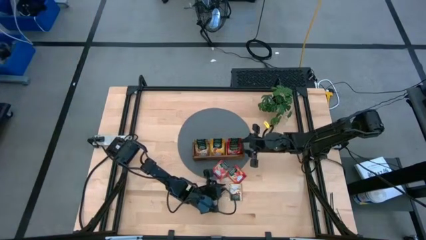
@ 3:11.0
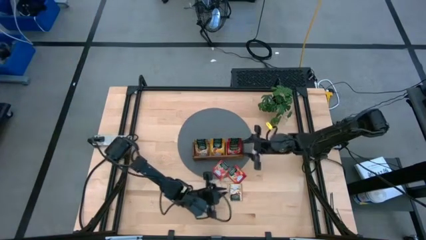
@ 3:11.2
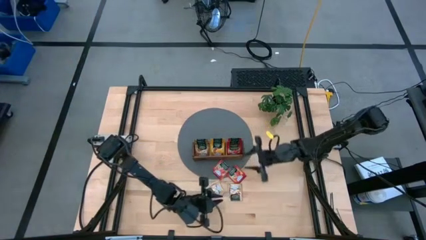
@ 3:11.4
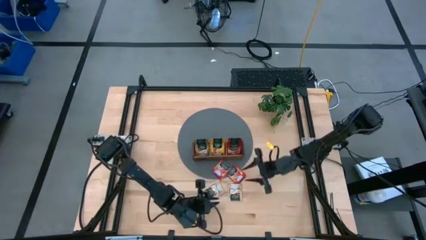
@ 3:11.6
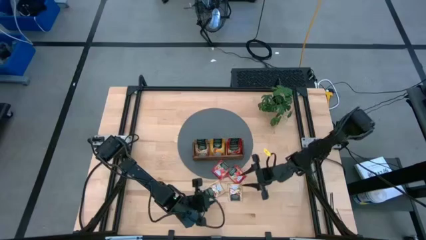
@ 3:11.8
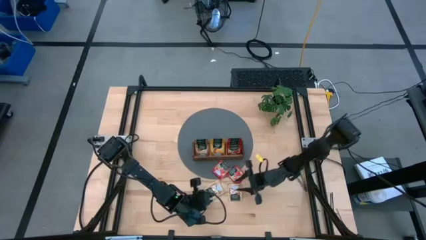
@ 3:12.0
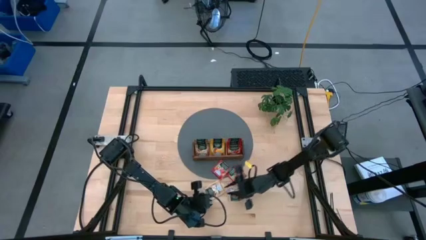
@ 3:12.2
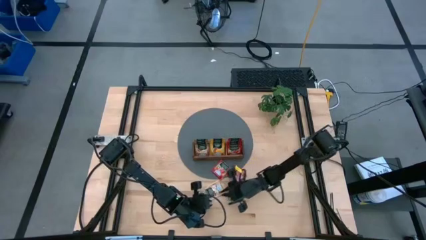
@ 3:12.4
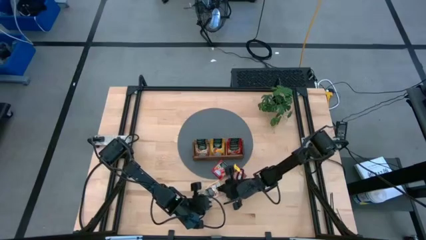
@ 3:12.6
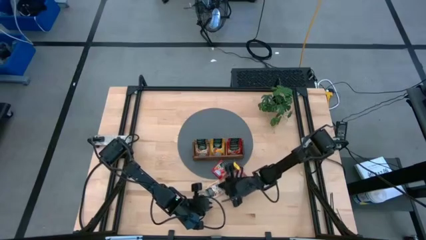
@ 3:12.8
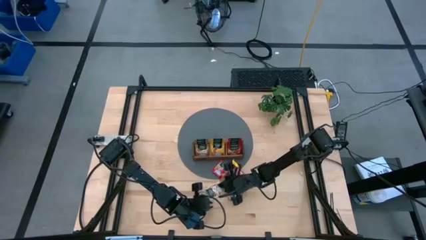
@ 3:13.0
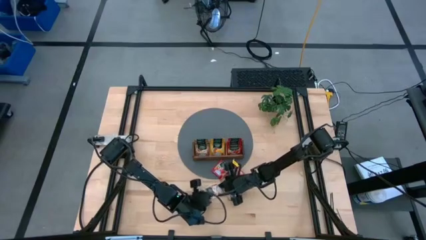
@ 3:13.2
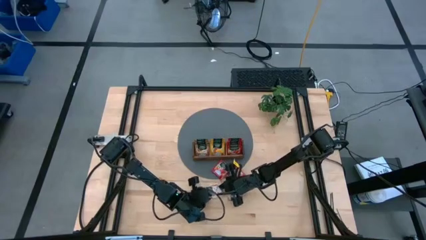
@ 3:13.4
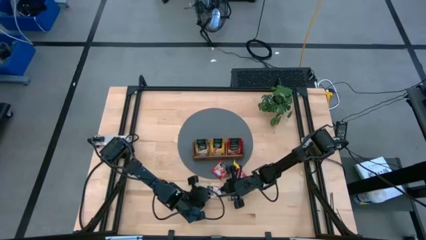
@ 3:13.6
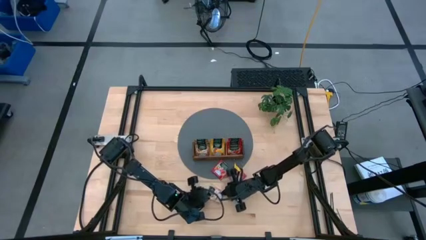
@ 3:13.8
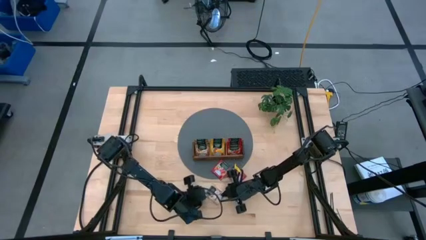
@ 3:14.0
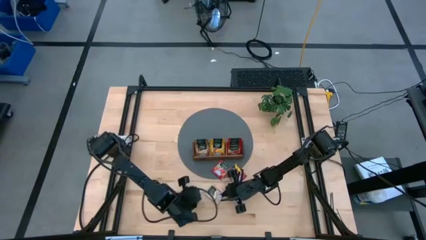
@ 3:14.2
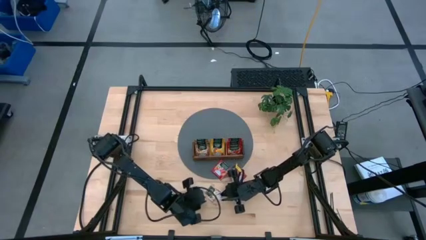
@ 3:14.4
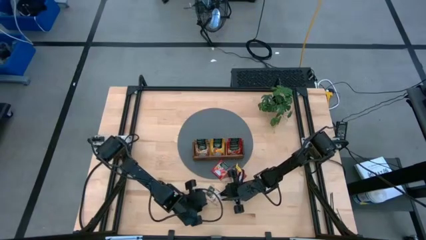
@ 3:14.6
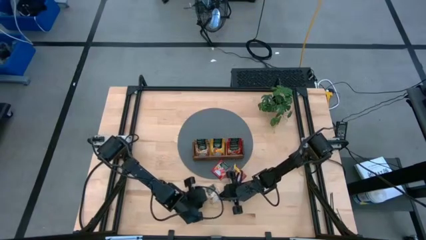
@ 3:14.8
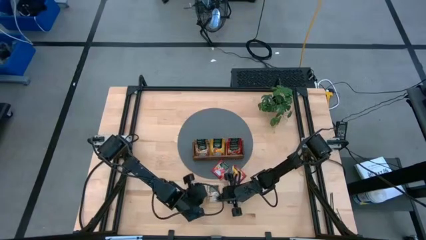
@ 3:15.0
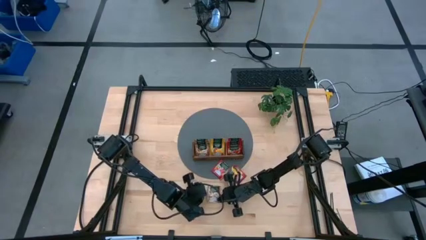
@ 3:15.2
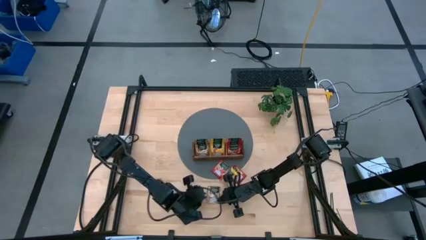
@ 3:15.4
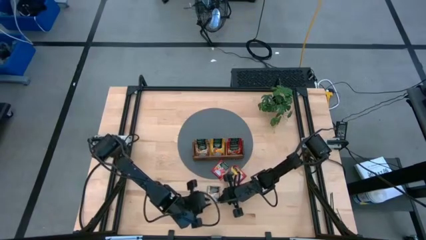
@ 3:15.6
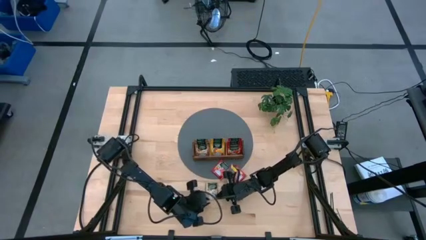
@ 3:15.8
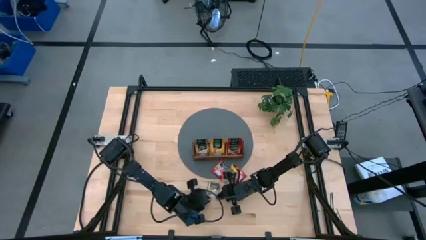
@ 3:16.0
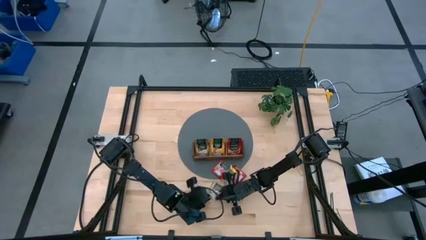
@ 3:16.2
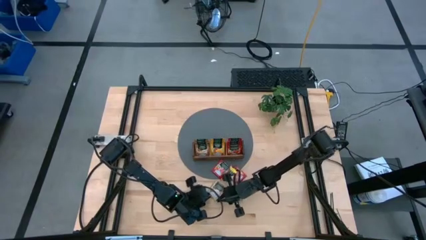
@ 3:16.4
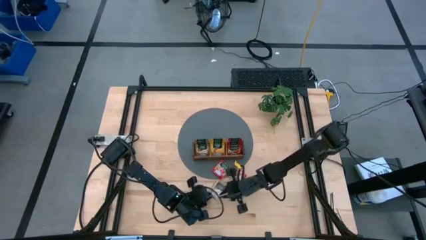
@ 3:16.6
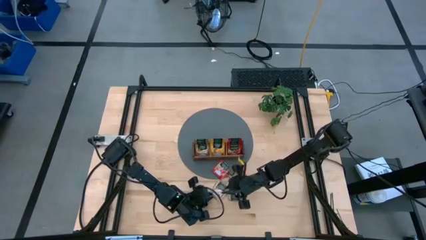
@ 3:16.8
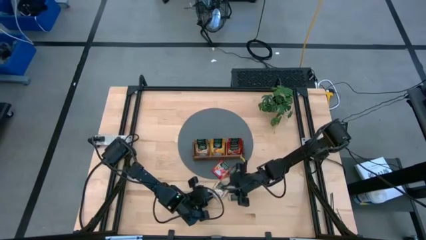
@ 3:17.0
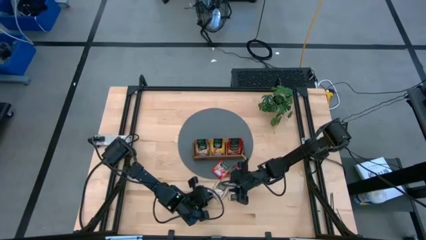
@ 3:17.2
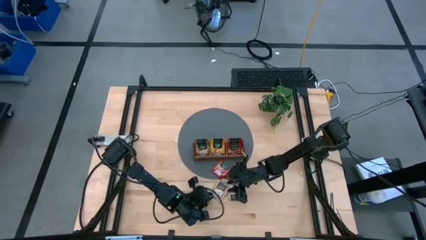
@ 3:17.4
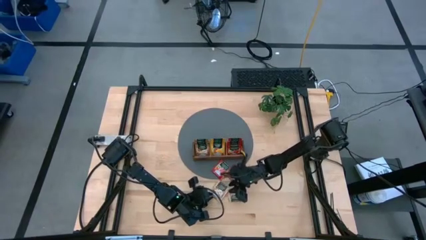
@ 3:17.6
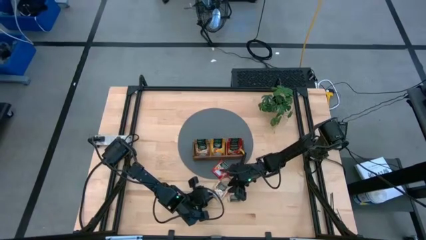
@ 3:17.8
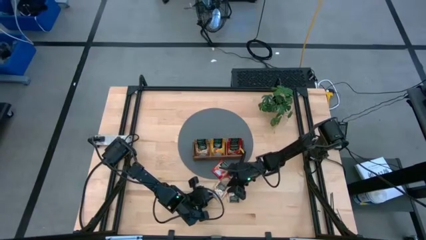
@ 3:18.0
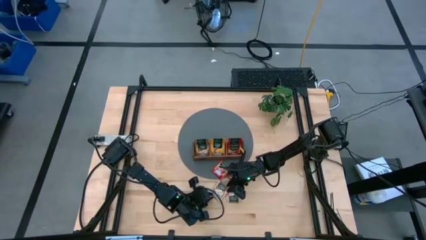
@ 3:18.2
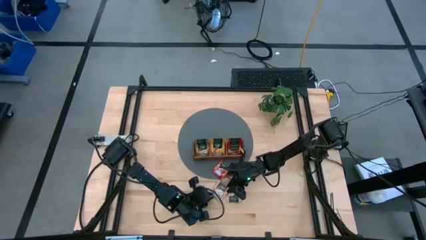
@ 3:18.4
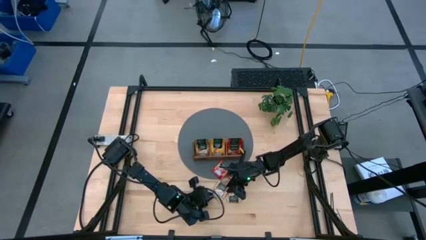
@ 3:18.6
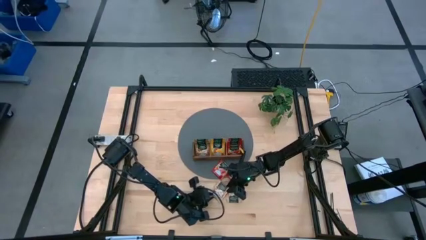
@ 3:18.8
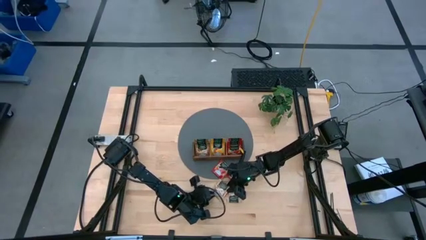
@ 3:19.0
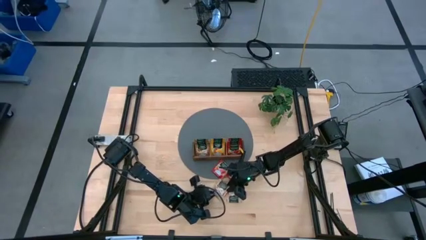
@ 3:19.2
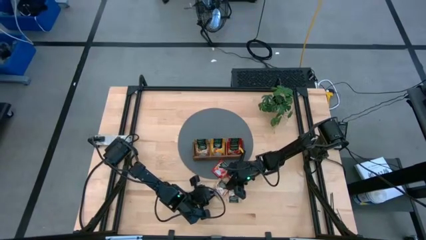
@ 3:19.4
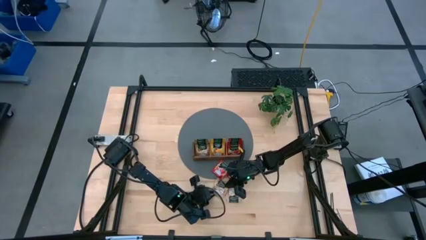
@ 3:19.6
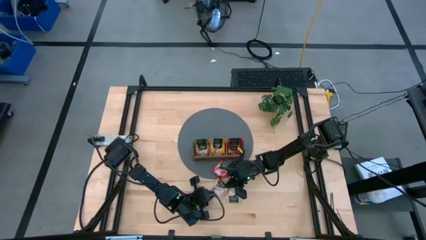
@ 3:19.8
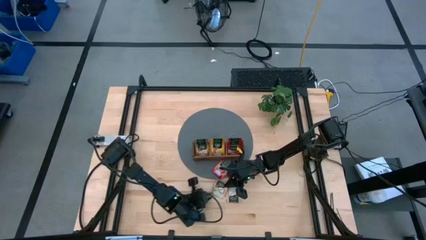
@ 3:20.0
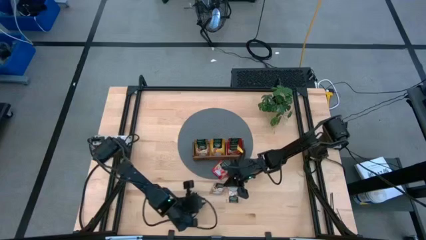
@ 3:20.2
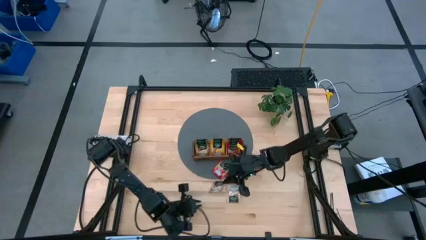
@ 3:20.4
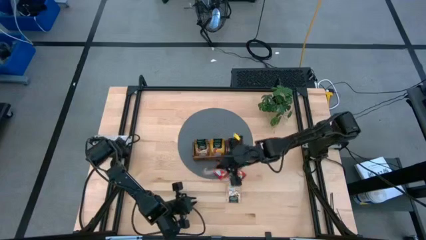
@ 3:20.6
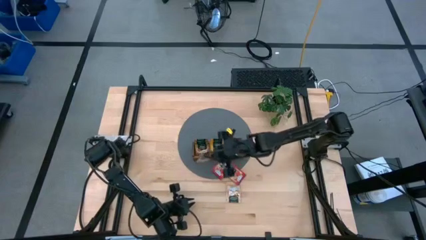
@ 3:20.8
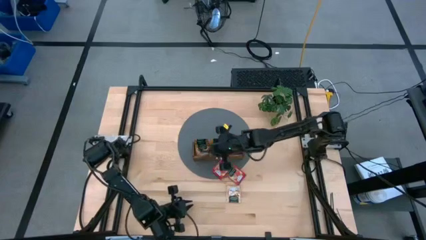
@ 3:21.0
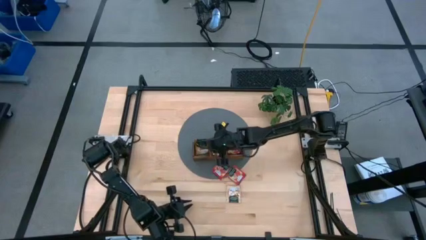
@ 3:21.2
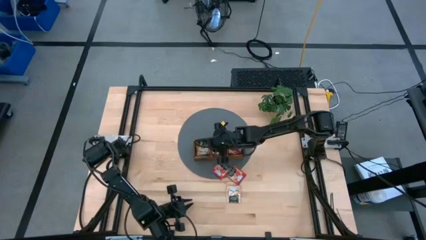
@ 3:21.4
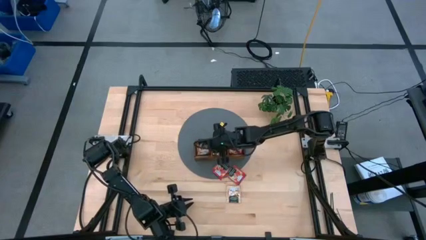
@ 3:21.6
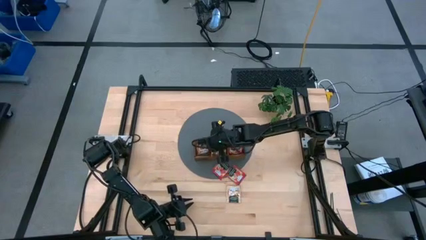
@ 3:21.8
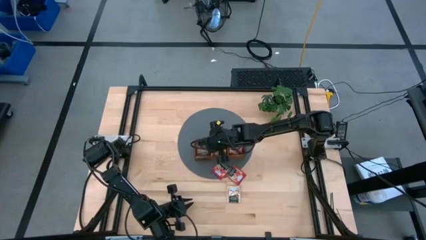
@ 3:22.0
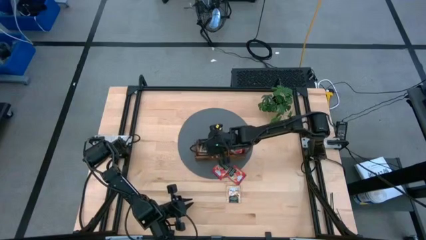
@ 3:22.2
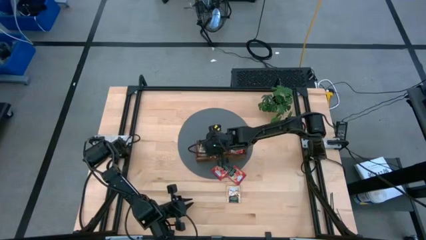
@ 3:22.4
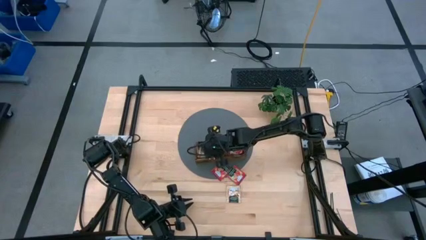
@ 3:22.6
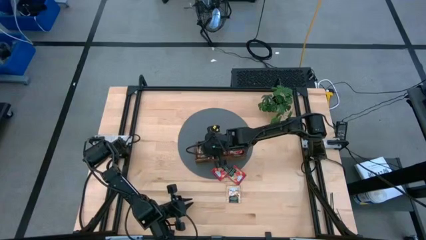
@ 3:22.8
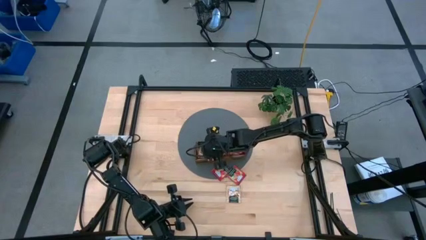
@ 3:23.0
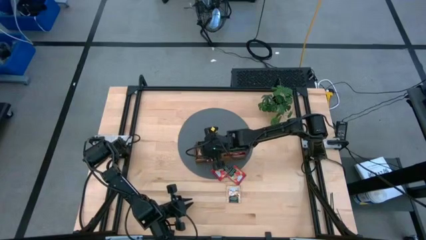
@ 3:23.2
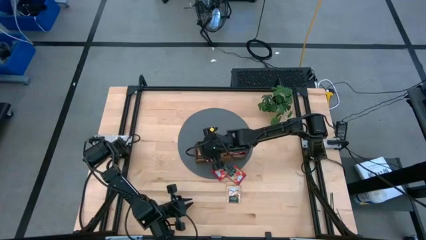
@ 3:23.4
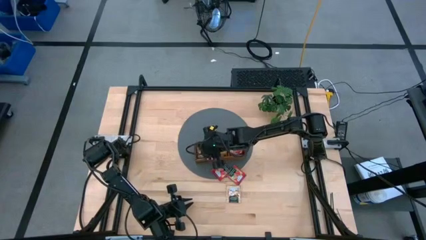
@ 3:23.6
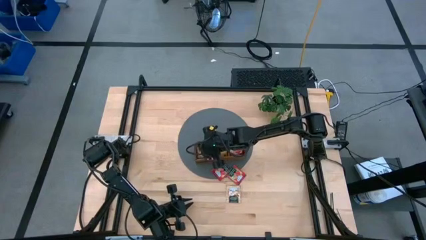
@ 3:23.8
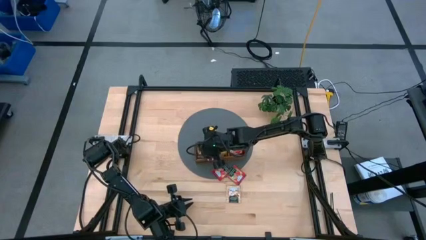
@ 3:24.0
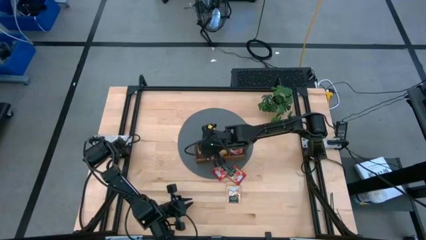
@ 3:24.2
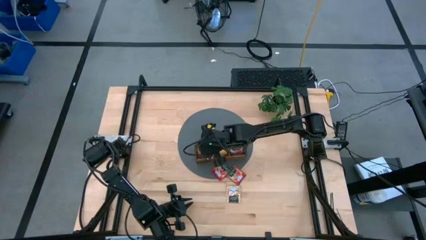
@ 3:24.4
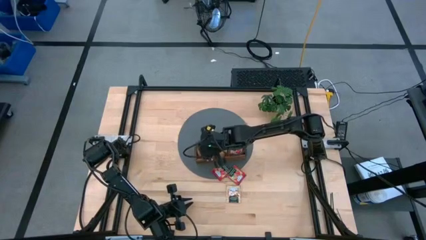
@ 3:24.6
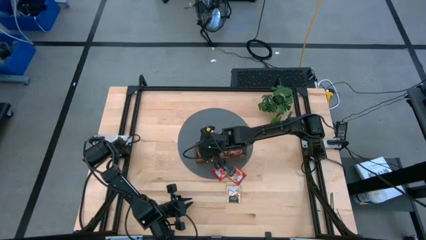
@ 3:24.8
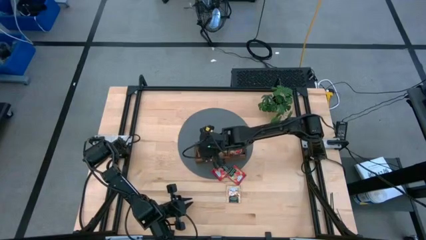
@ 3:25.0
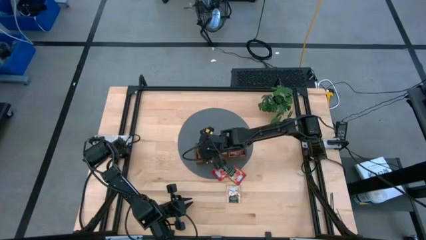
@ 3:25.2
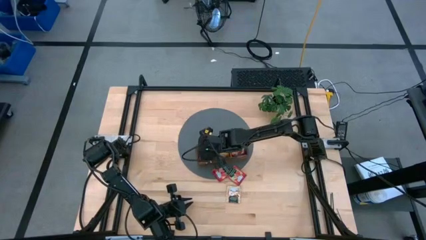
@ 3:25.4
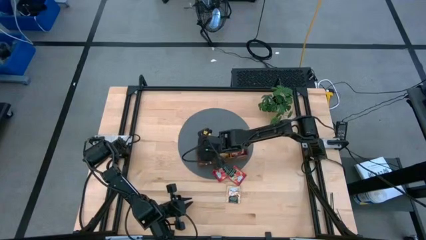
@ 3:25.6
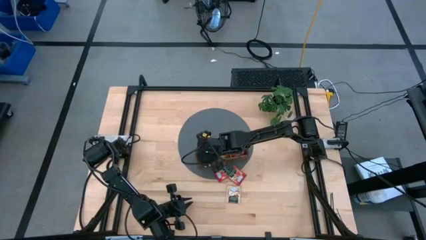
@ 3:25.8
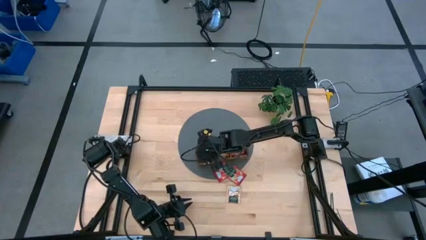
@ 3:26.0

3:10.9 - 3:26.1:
Task: Pick & Place Tea
Put the brown tea bag into the left section of the wooden organizer
